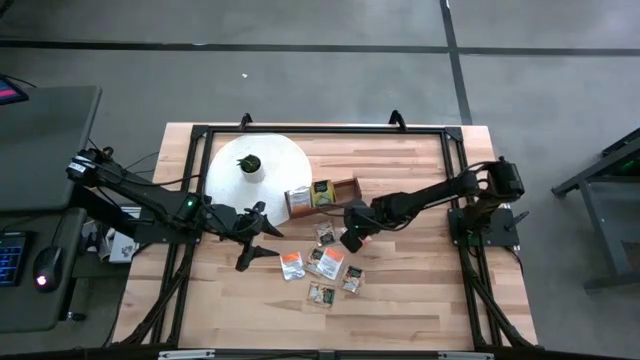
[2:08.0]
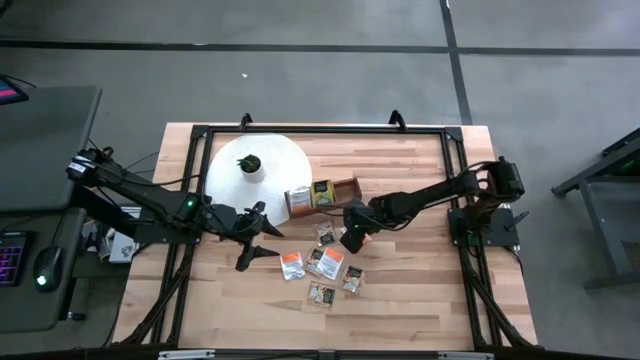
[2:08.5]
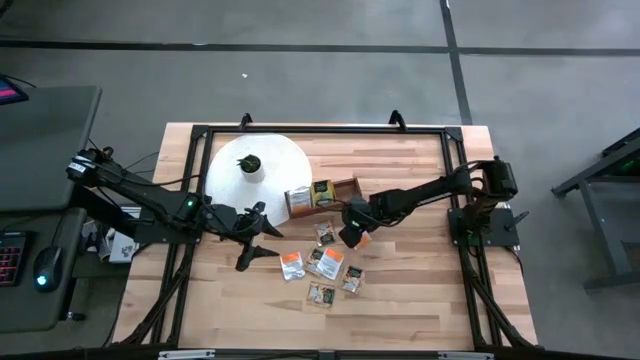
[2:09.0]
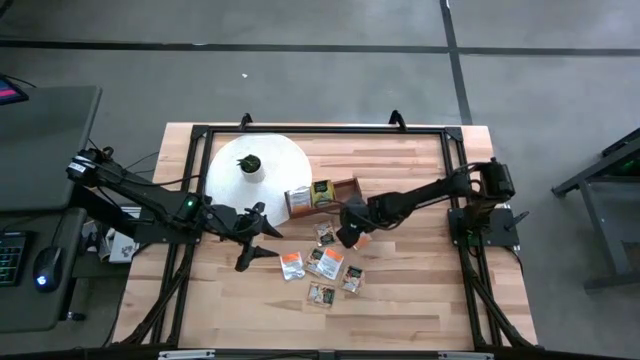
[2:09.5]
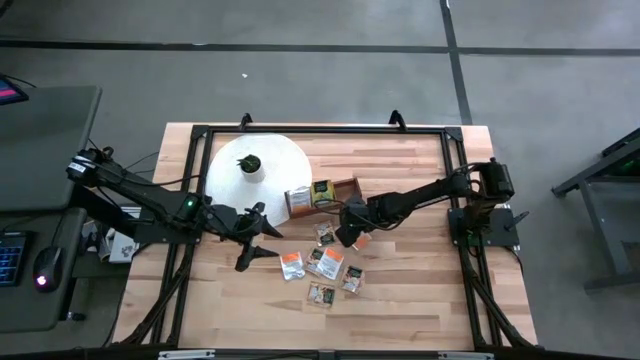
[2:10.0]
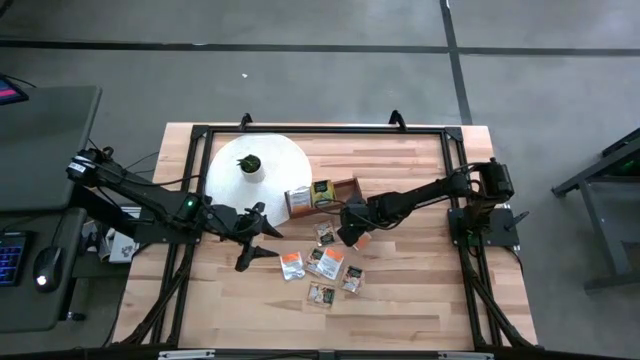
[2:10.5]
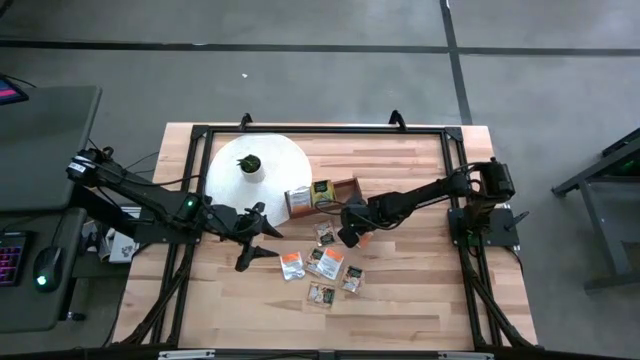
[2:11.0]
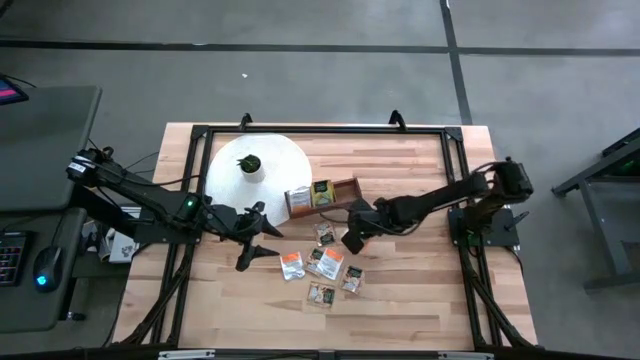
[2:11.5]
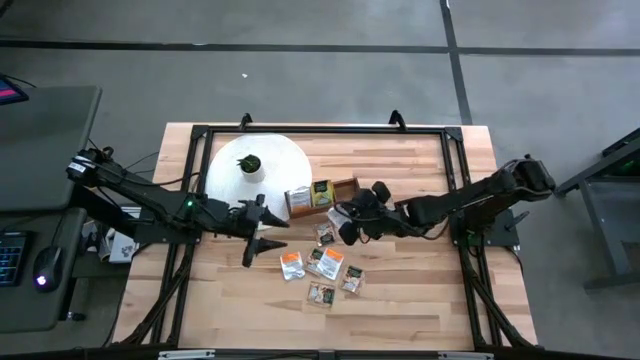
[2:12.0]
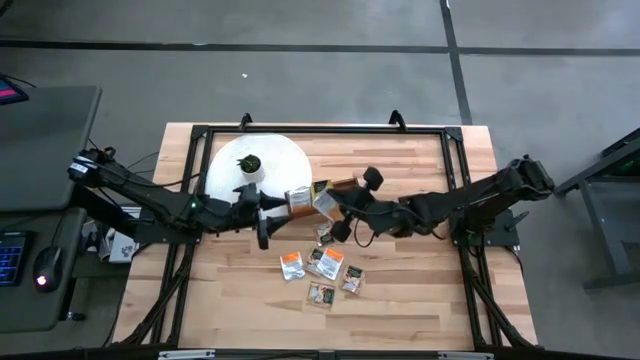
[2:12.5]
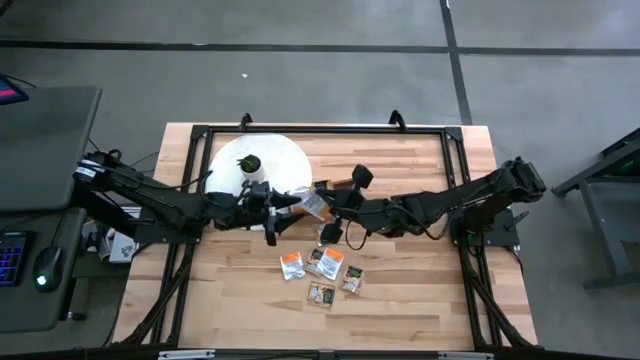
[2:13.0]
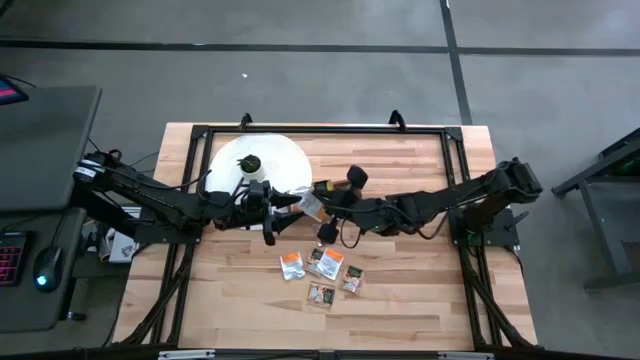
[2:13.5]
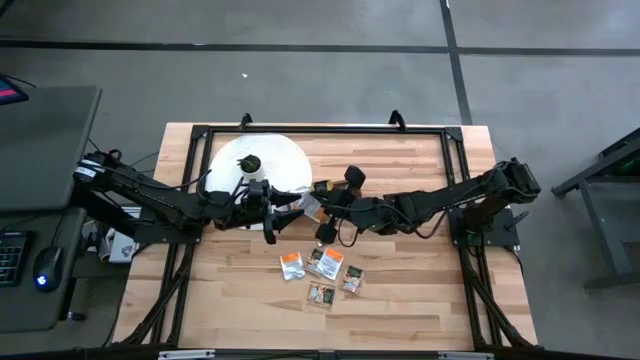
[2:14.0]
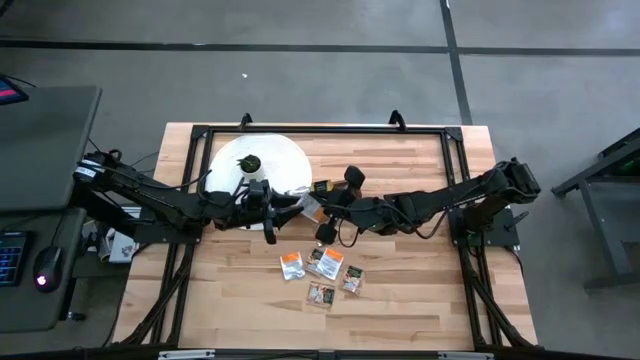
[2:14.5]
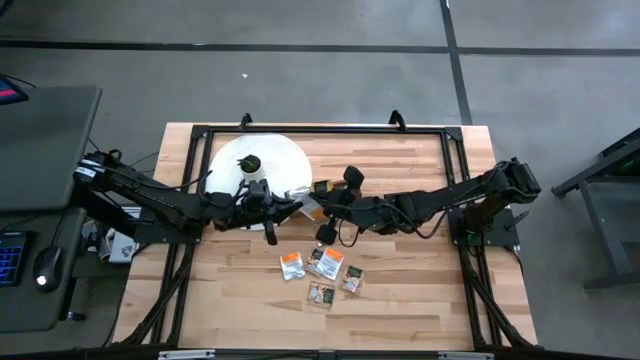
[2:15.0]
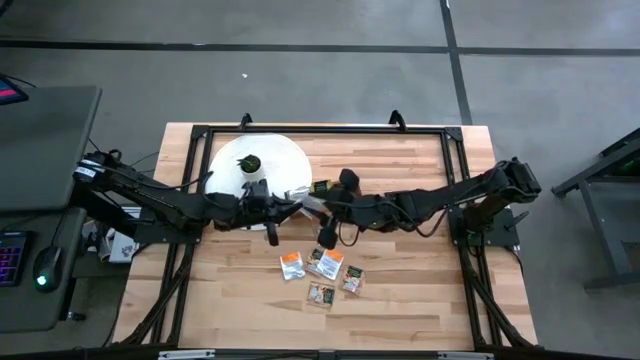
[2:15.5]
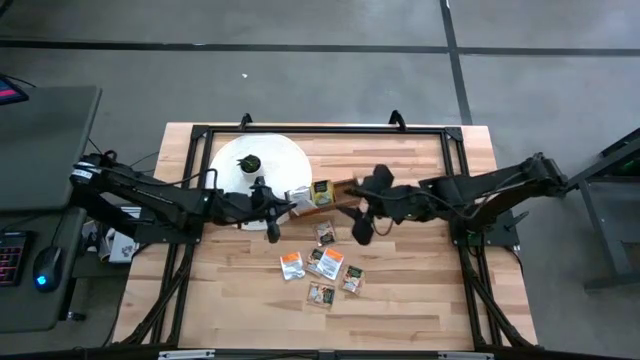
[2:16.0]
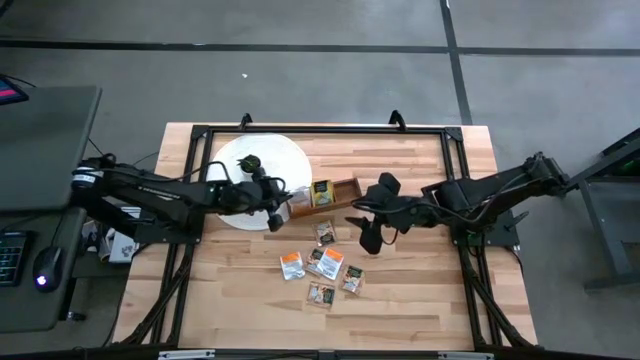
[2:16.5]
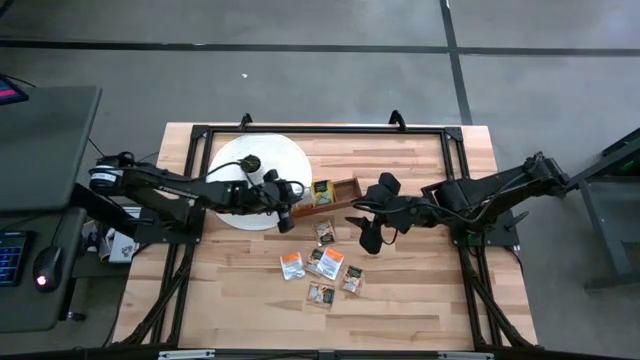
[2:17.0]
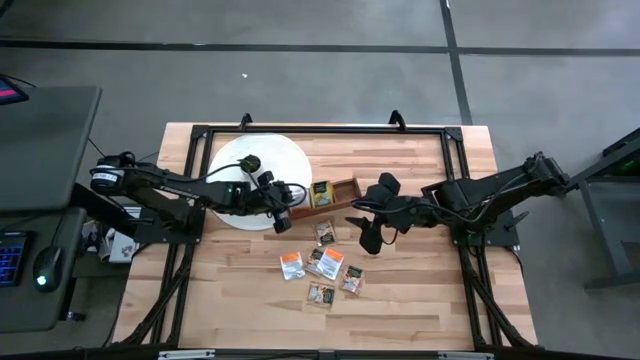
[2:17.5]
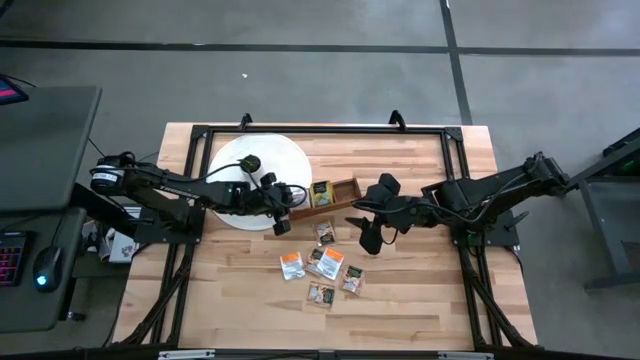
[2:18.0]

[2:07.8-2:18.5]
Task: Pick & Place Tea
Put the white tea bag into the left section of the wooden organizer

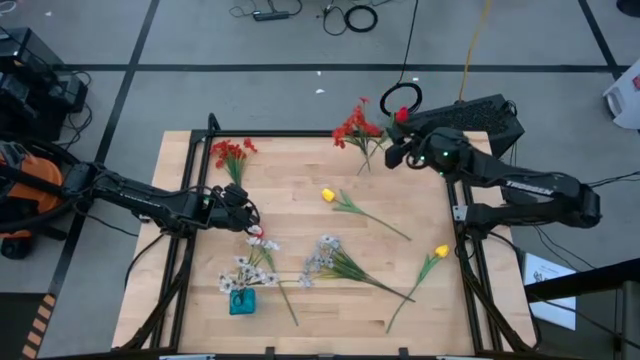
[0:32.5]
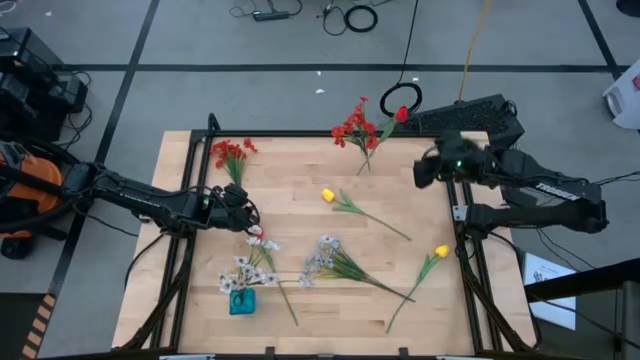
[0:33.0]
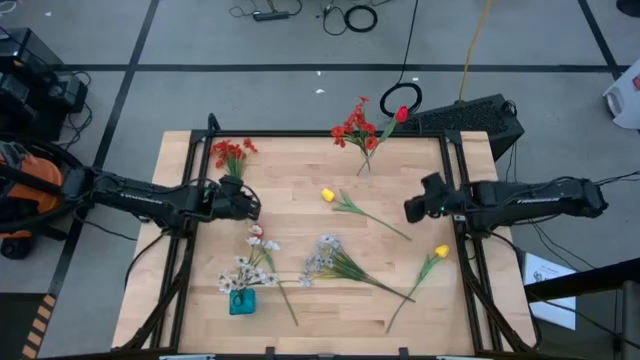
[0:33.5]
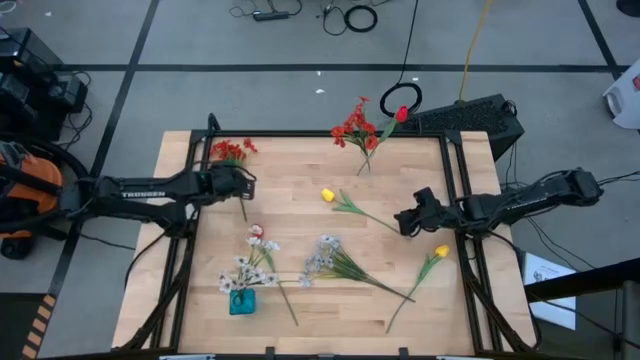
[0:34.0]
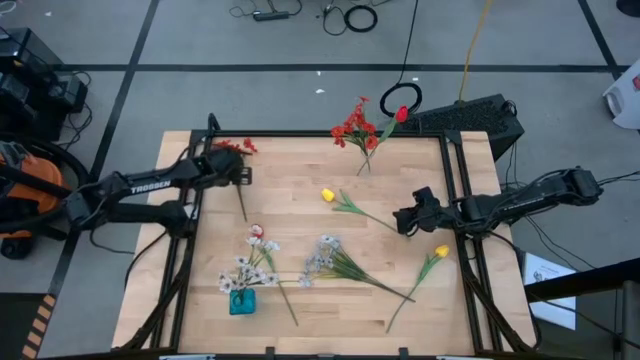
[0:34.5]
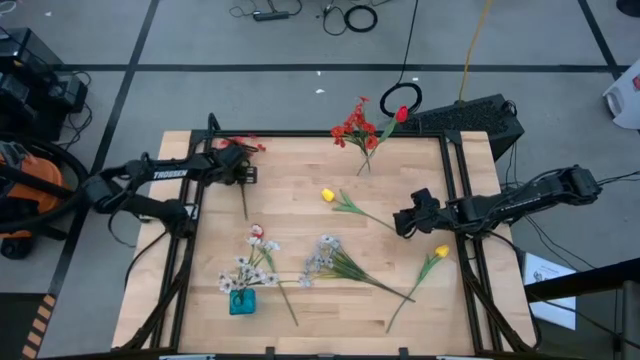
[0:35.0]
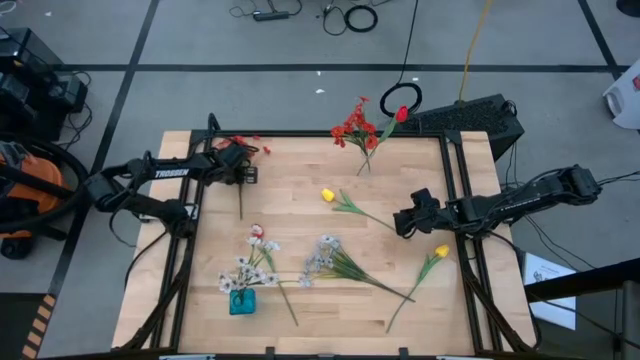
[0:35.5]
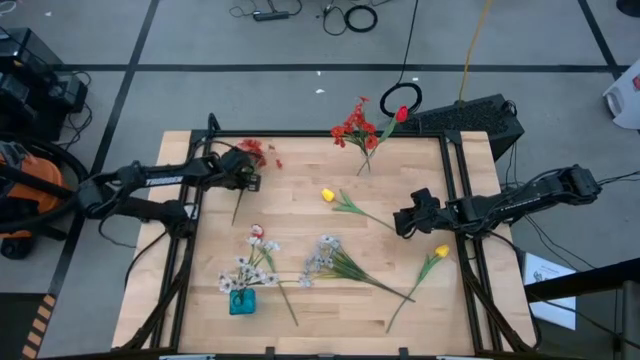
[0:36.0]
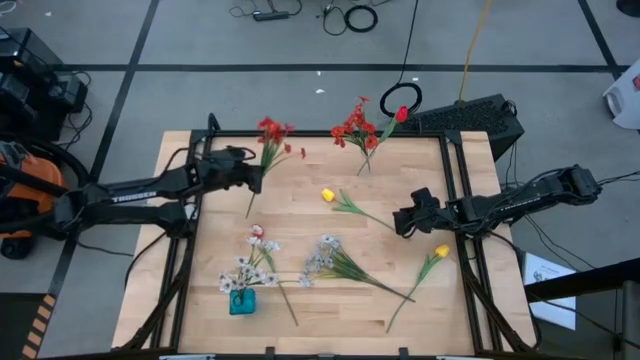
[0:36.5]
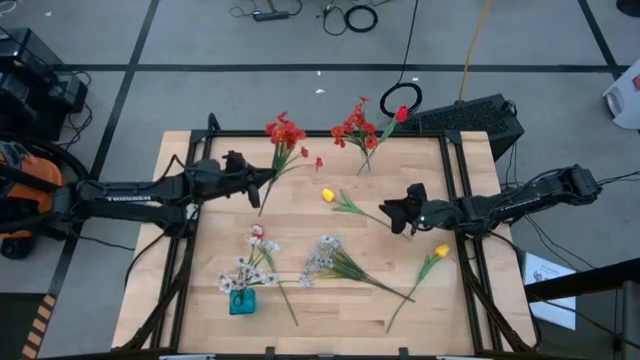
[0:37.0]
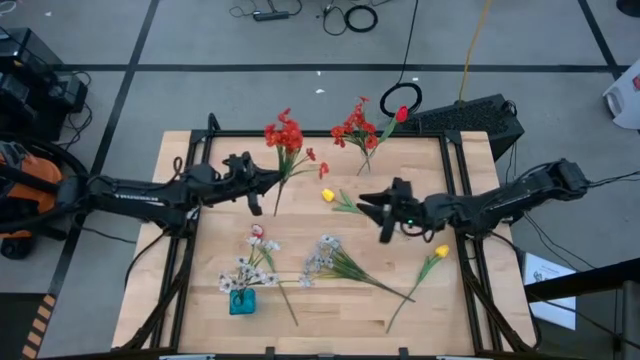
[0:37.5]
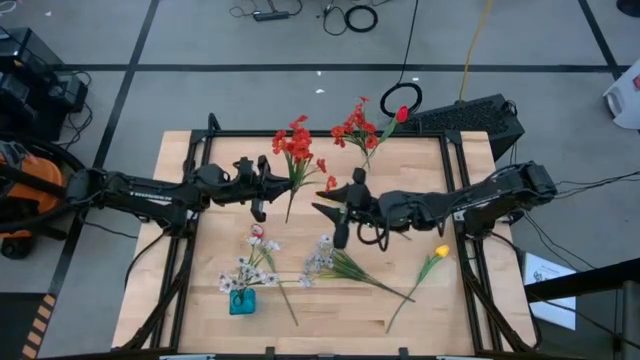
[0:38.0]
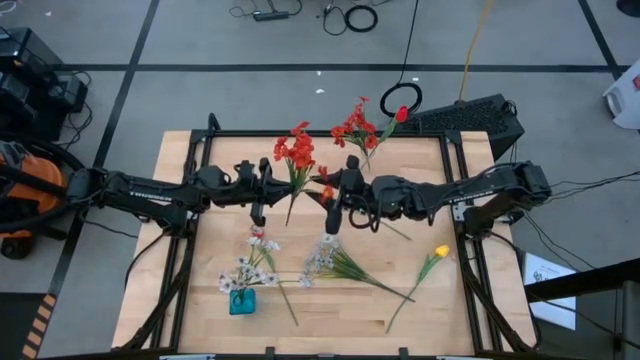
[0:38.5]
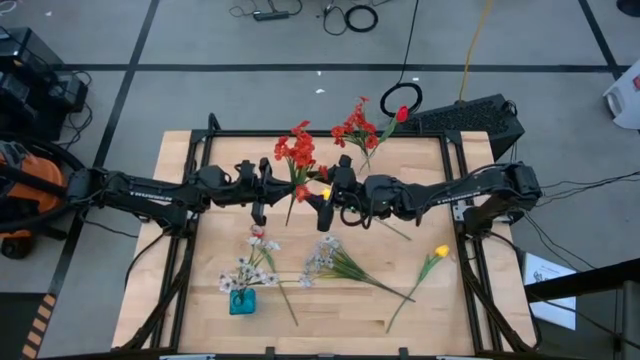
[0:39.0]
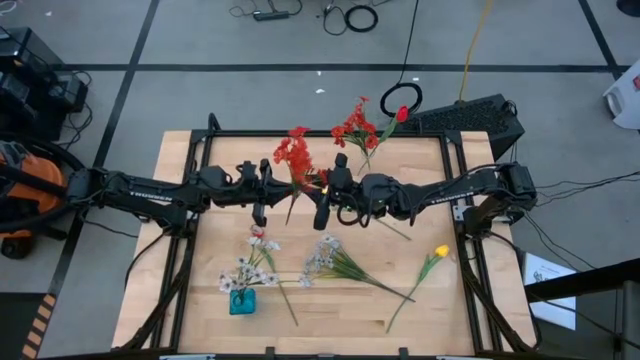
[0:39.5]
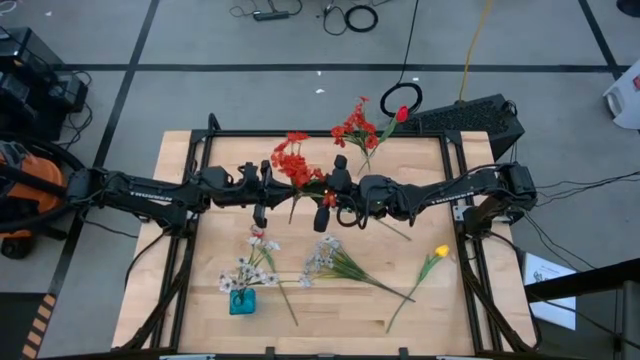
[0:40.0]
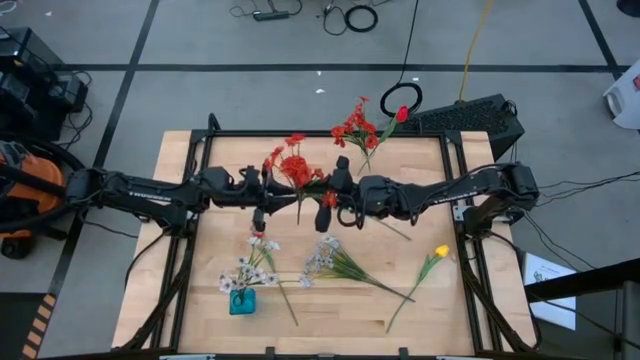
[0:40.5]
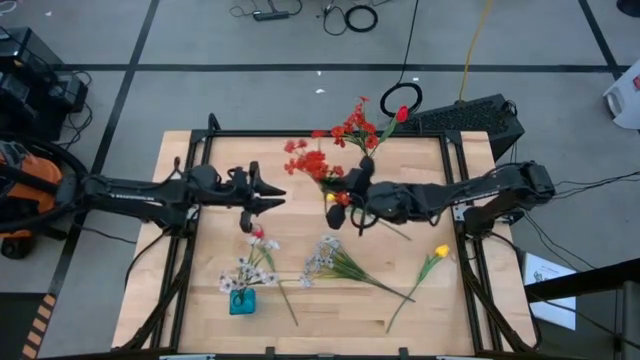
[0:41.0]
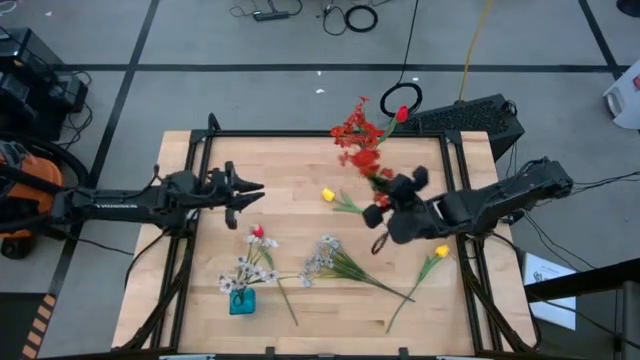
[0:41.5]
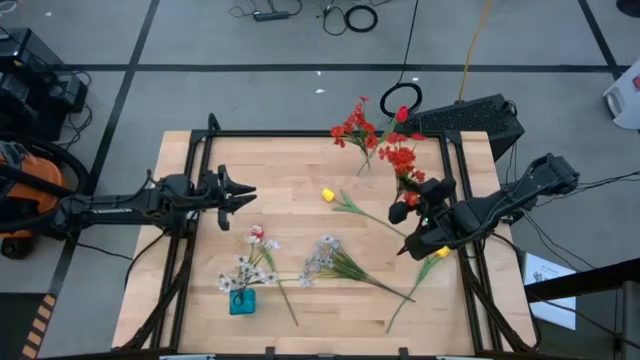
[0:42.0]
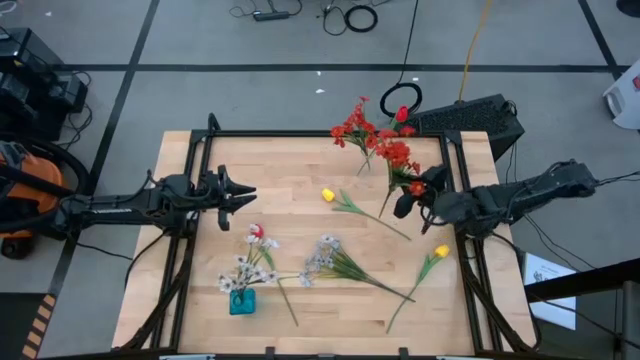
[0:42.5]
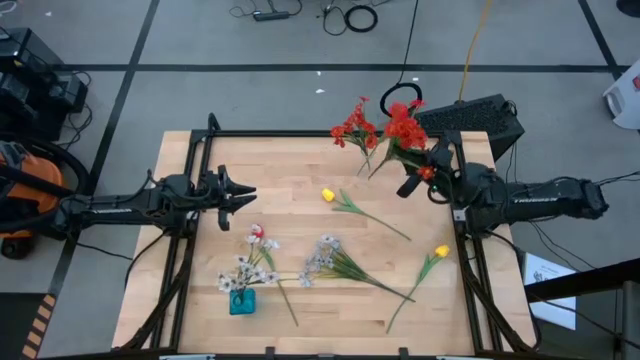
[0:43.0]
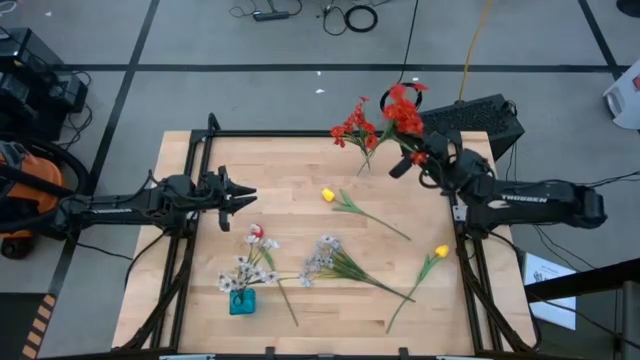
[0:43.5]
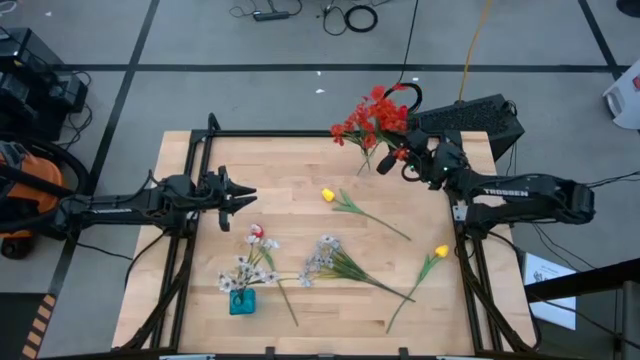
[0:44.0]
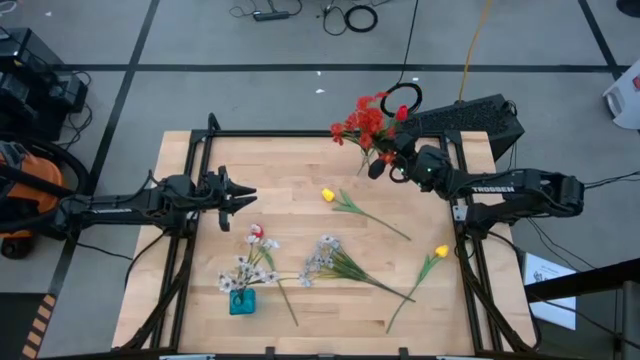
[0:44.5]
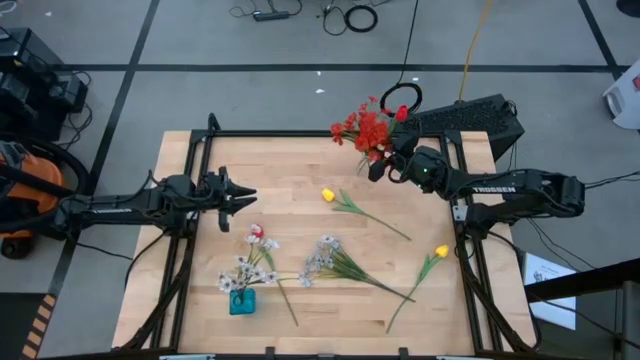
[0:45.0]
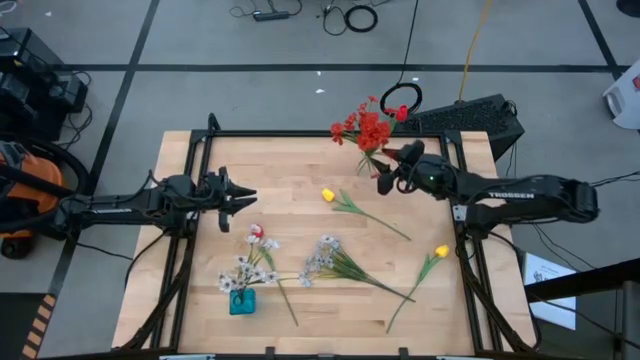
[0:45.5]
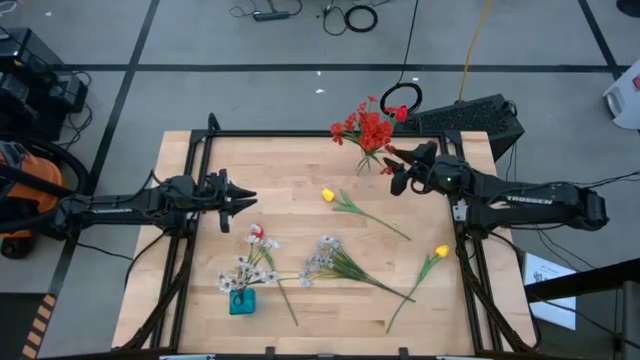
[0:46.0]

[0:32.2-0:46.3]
Task: Sort flowers into vase by color
Put the red flowers into the transparent flower vase
